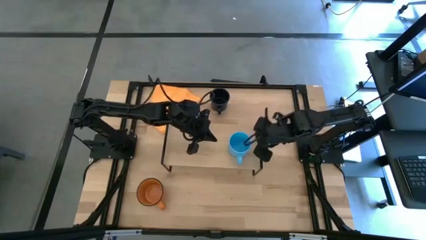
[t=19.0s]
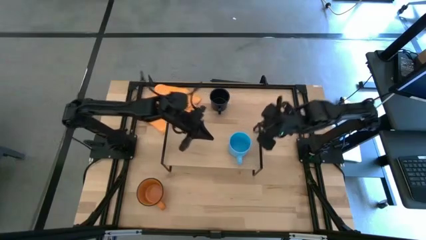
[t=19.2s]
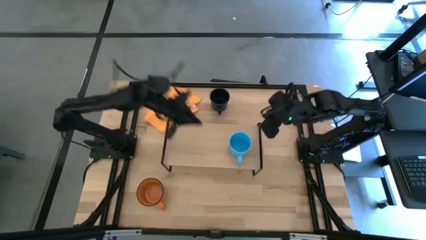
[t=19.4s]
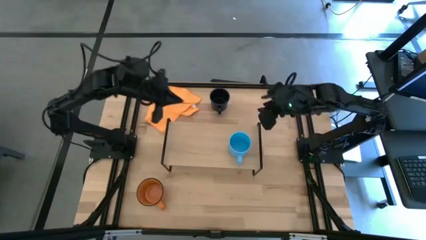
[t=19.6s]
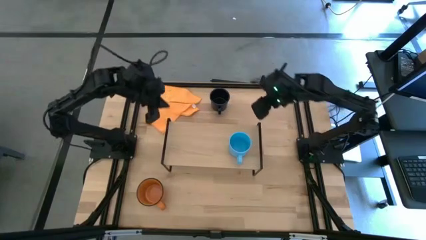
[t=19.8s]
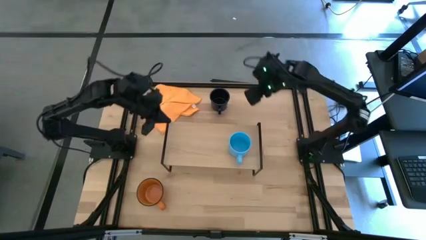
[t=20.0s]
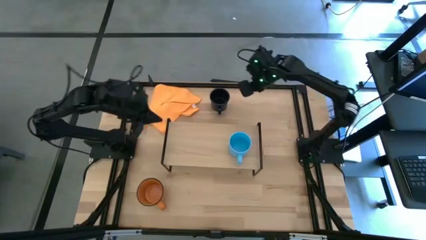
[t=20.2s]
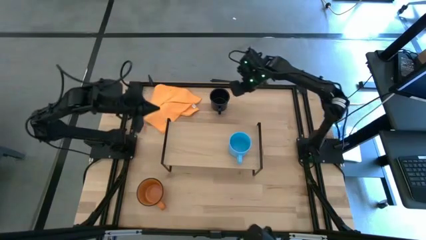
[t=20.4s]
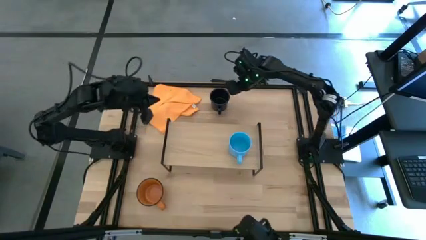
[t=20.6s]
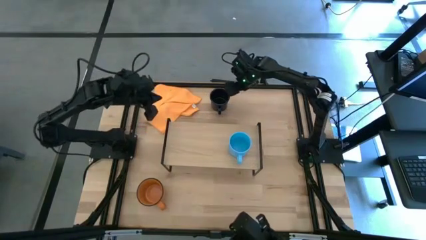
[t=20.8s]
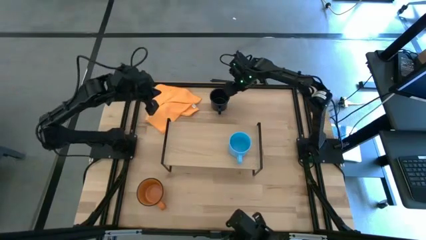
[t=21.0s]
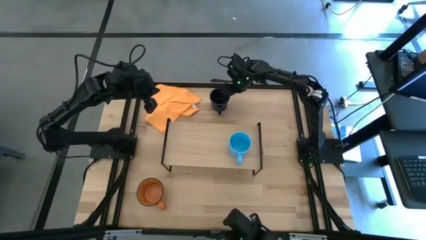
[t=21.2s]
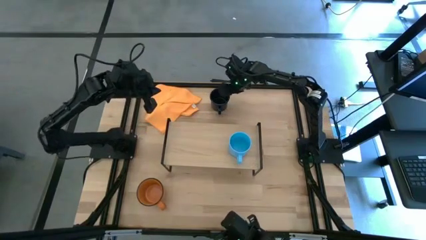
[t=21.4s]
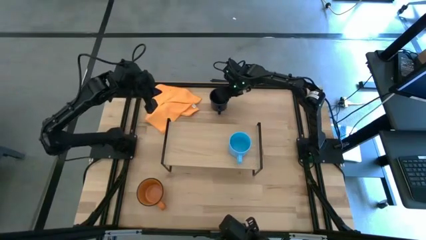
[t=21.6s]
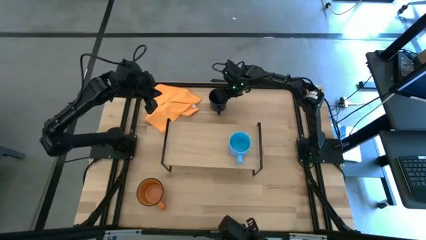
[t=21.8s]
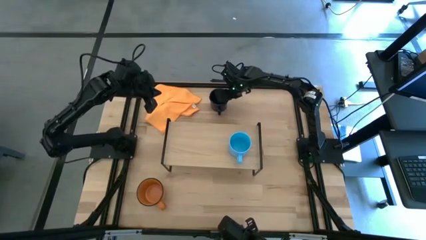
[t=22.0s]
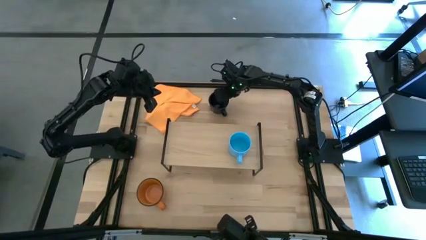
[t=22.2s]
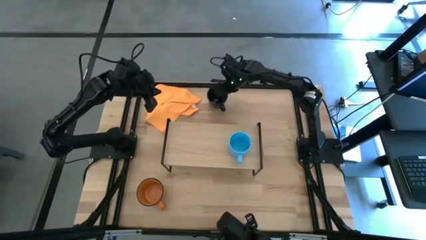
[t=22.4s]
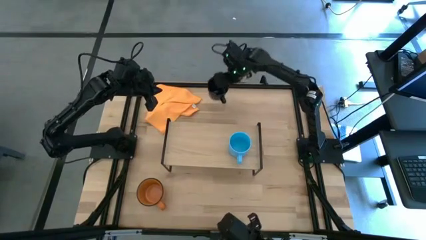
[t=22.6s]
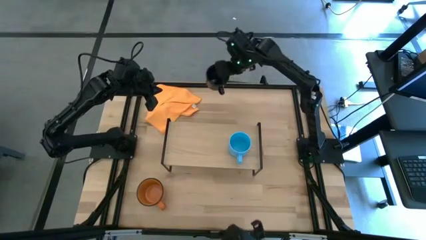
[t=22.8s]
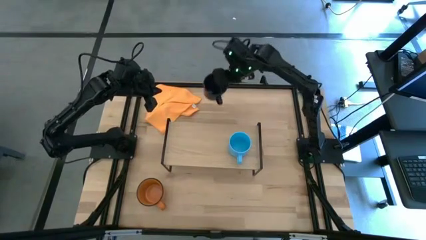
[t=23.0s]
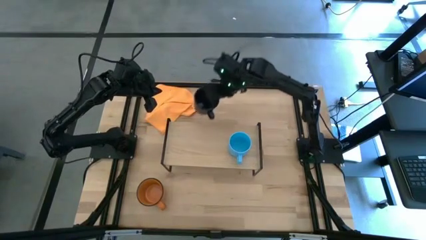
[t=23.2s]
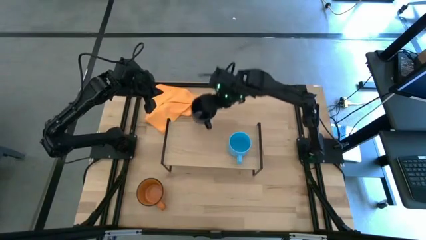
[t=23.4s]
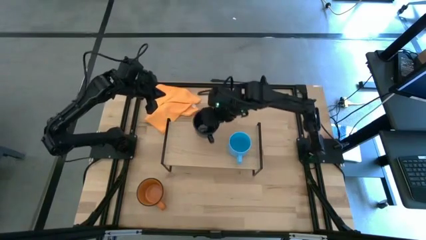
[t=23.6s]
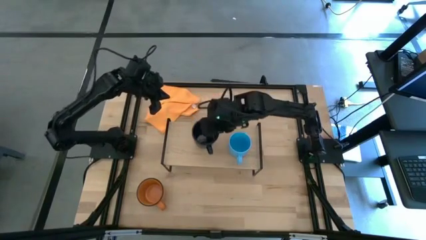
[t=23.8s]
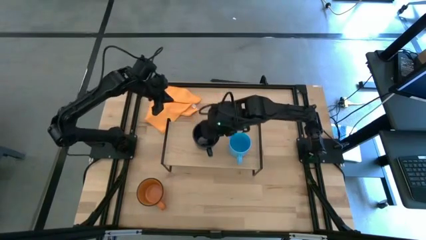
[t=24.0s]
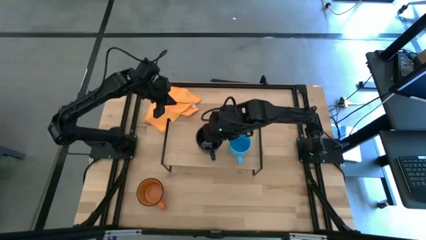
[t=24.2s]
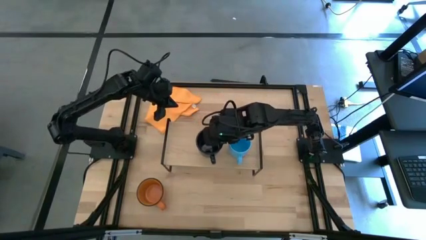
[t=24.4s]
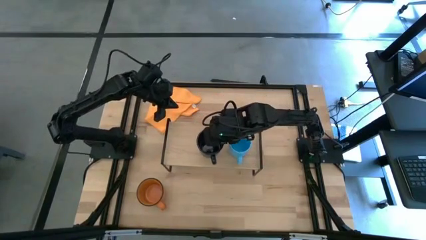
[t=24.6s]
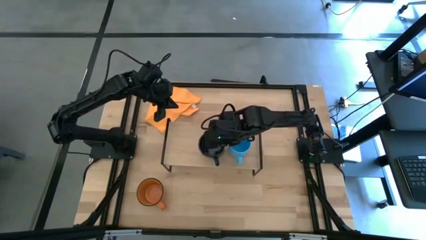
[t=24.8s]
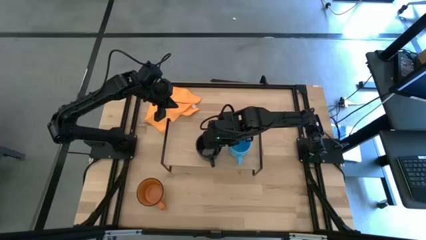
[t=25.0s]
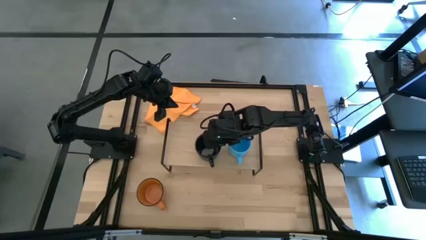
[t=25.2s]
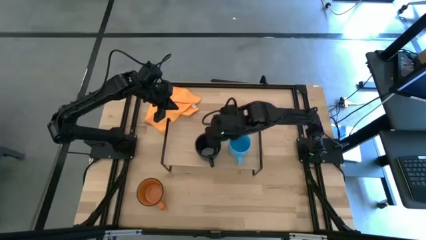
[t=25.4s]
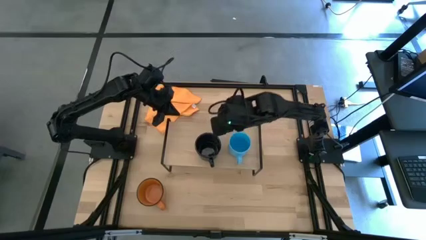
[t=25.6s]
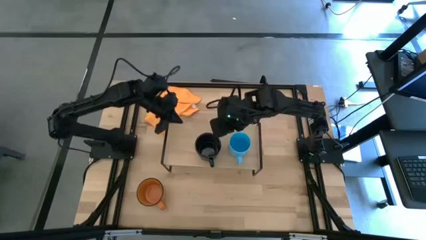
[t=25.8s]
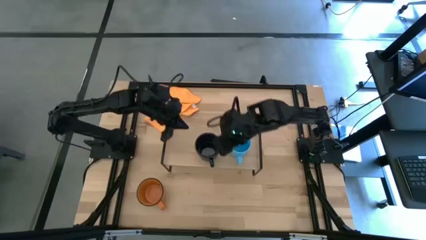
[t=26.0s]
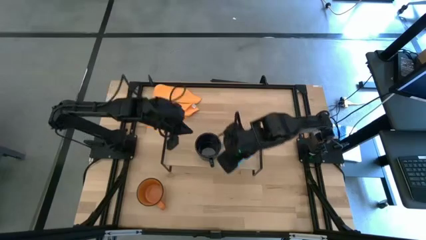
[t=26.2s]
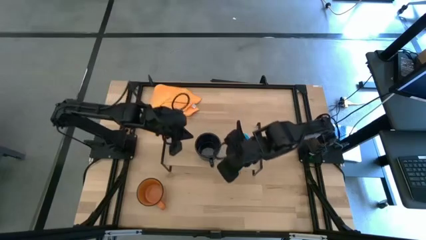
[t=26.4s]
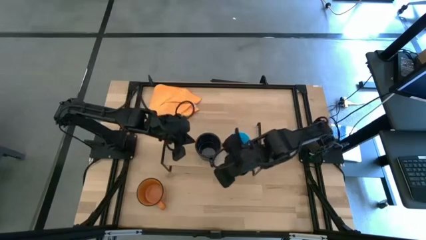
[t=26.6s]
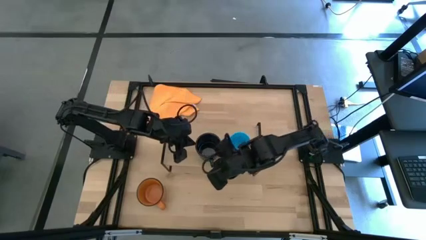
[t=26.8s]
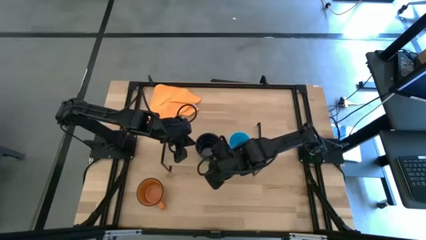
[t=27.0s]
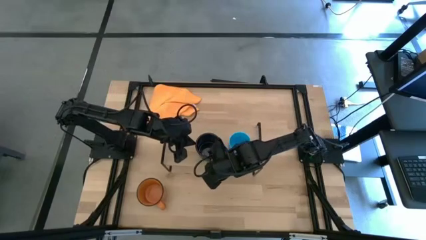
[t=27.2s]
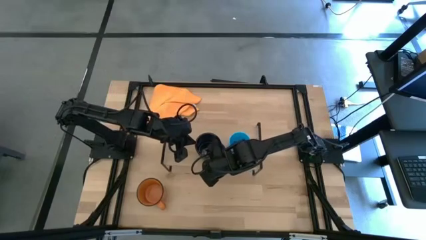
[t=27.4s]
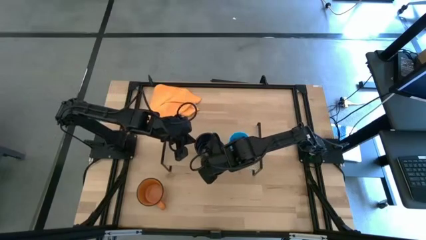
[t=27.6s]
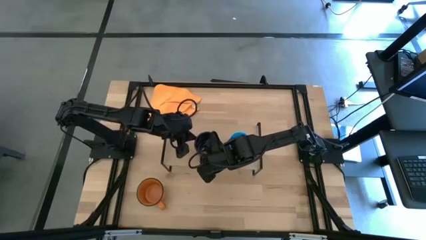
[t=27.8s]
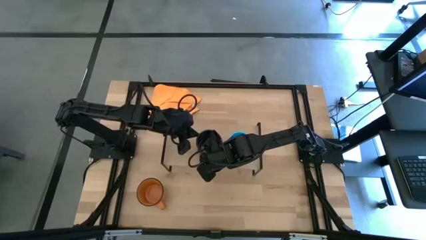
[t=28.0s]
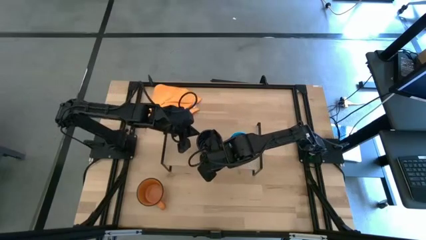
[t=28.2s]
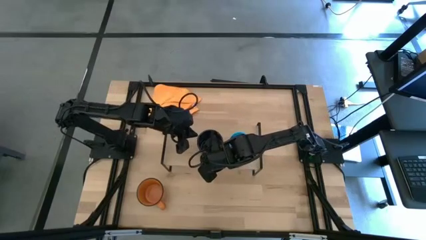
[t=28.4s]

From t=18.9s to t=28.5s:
Task: Stack small to large cups/mugs on shelf
Put the black cup on the shelf
